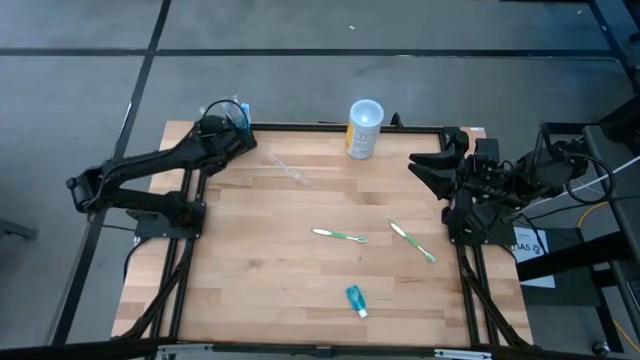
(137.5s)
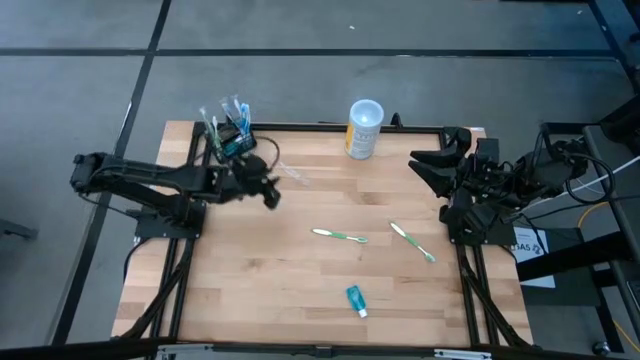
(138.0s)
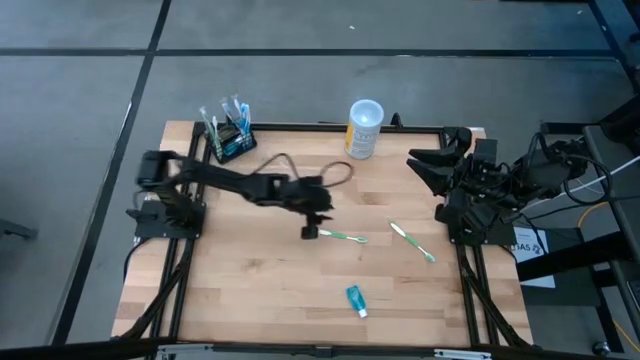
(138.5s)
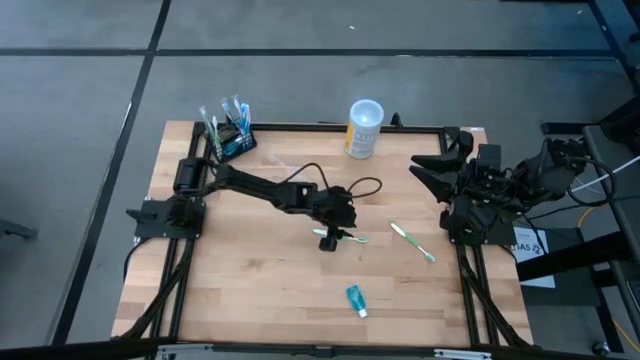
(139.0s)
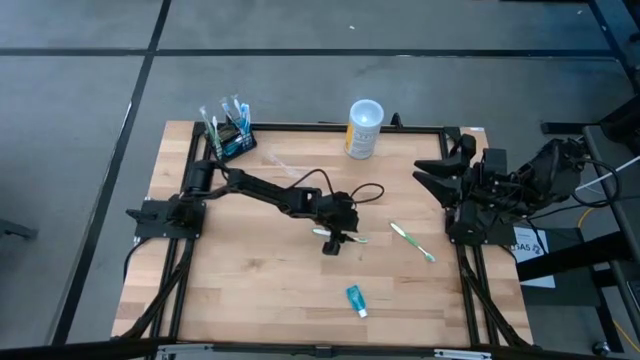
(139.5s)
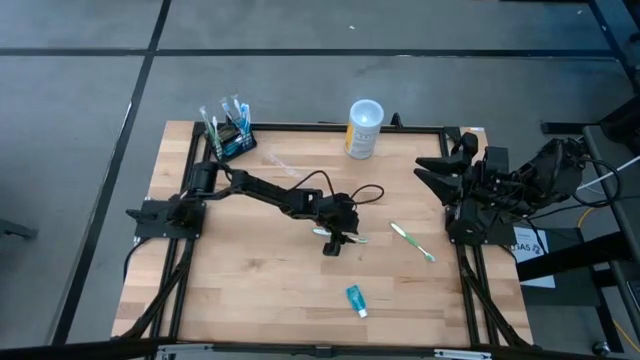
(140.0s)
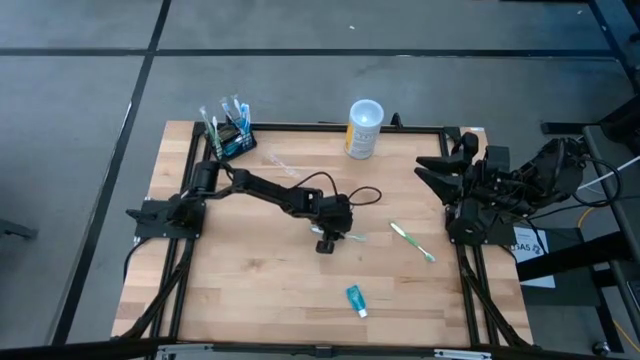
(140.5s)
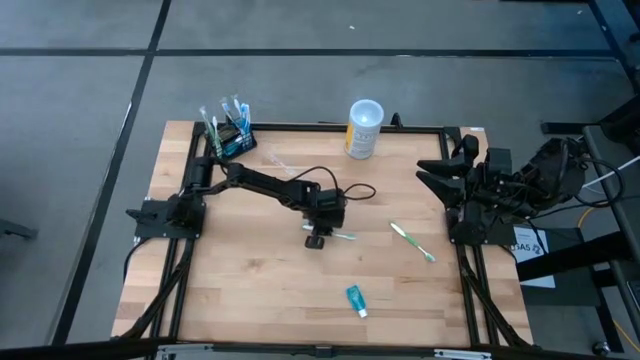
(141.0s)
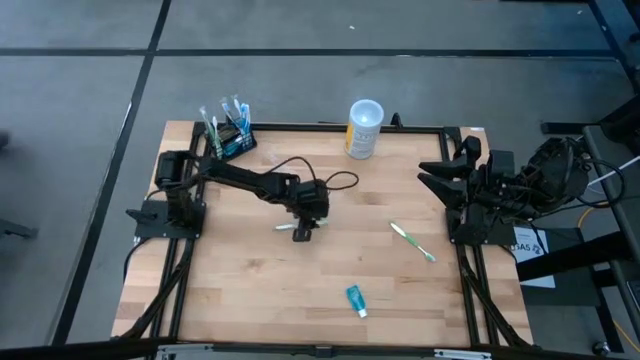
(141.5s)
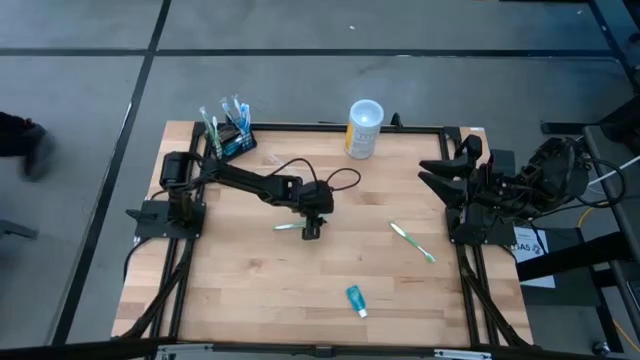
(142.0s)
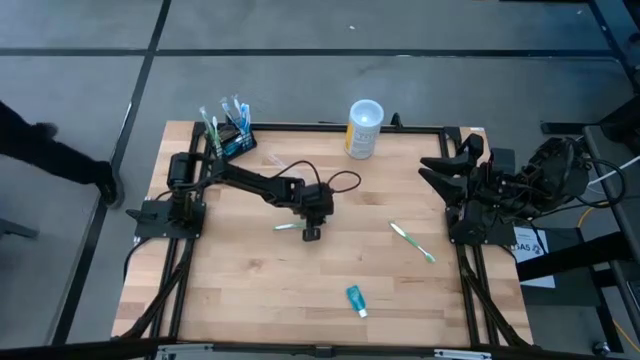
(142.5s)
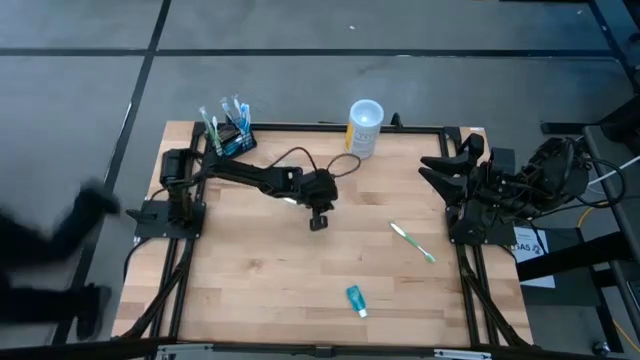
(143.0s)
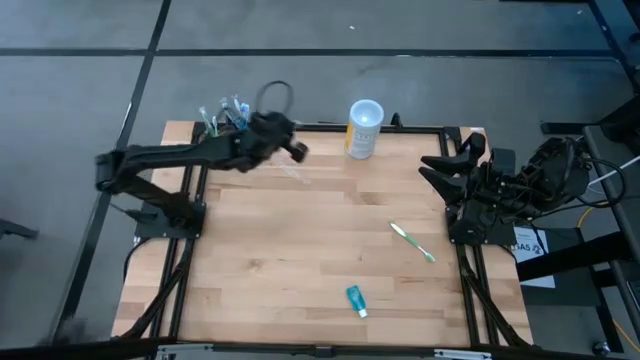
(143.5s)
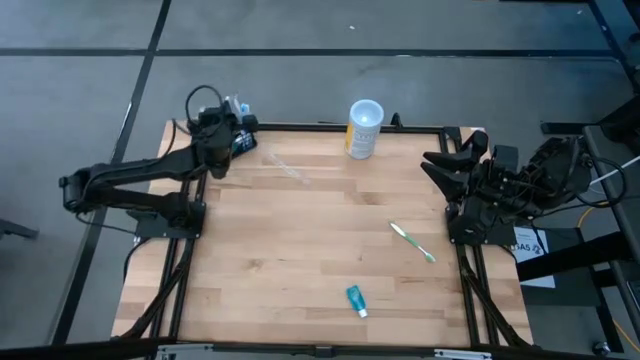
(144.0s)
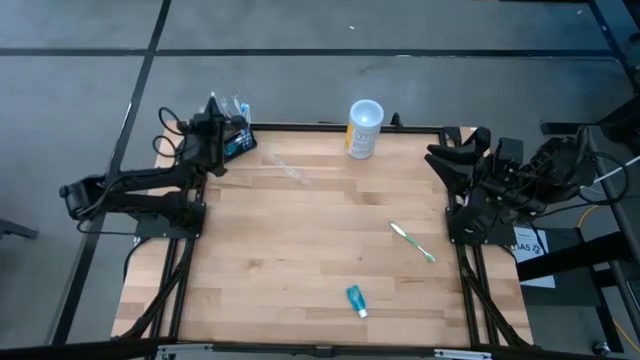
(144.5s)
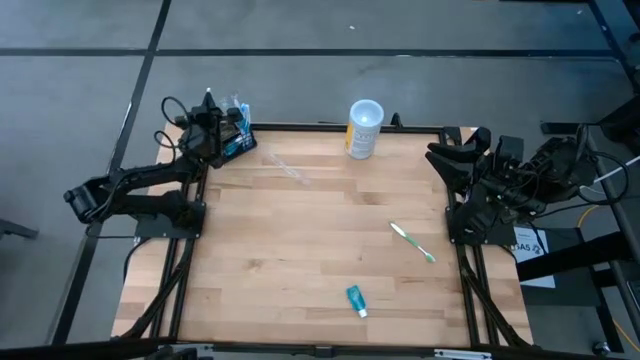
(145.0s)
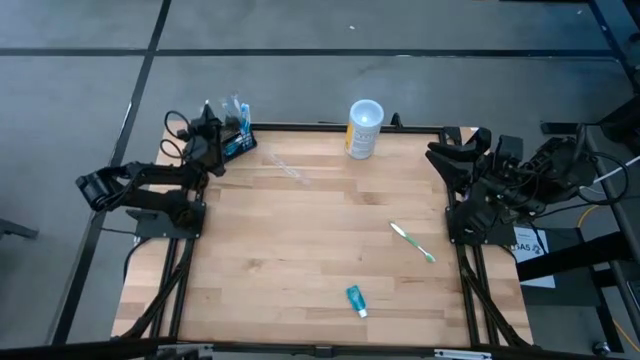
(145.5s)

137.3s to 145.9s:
Task: Pick & Place toothbrushing station
Put the green toothbrush into the left section of the black organizer

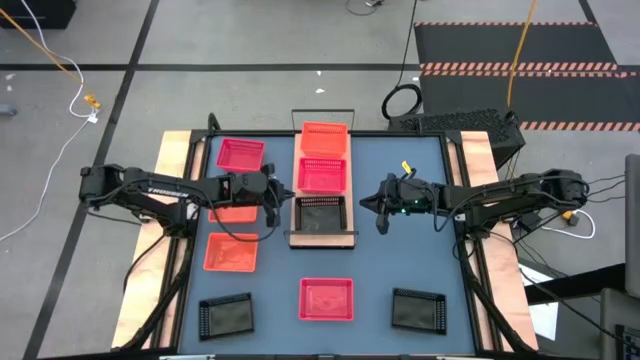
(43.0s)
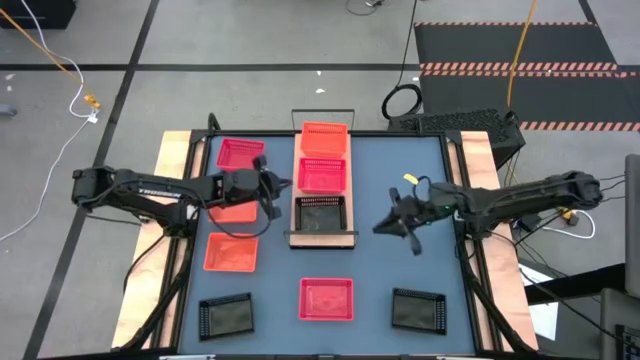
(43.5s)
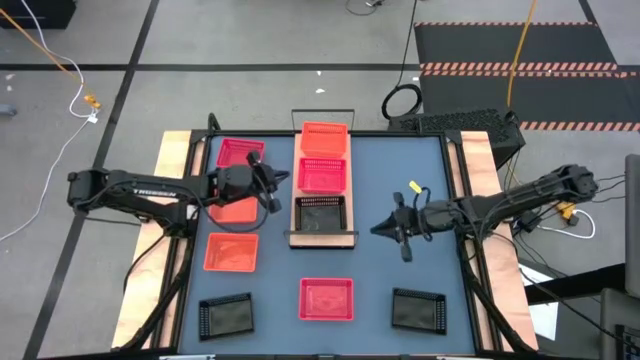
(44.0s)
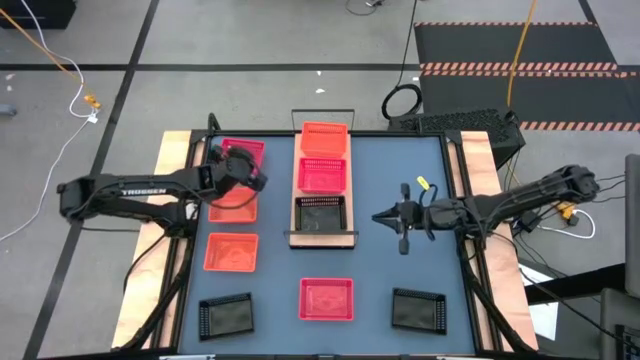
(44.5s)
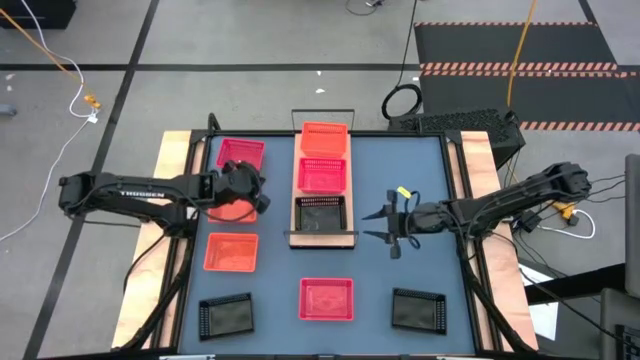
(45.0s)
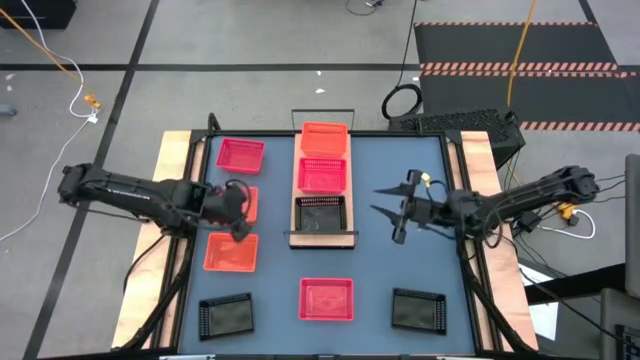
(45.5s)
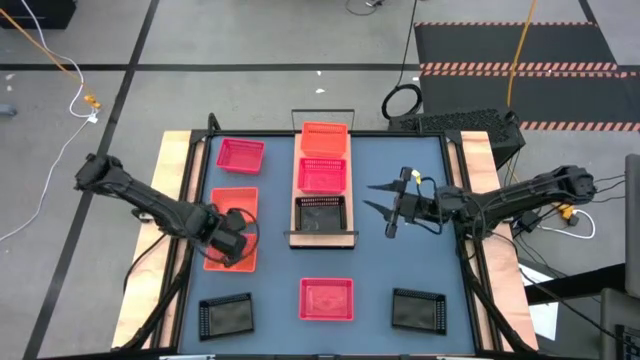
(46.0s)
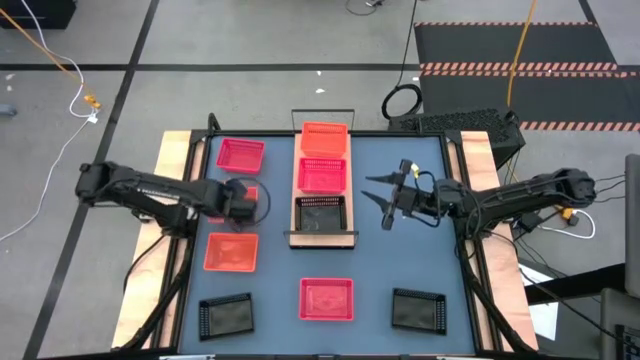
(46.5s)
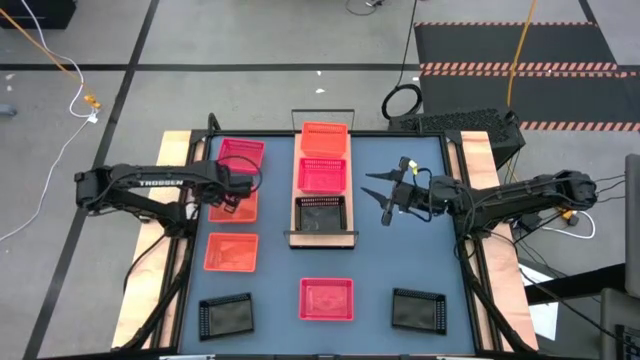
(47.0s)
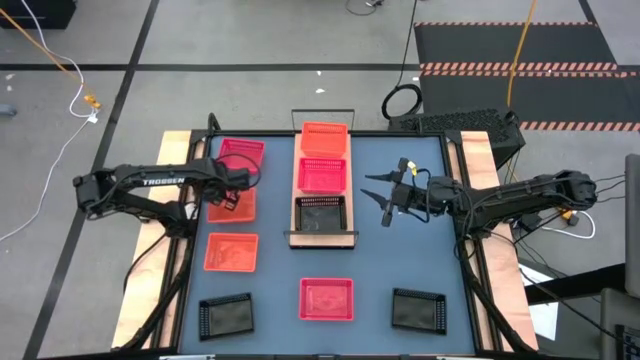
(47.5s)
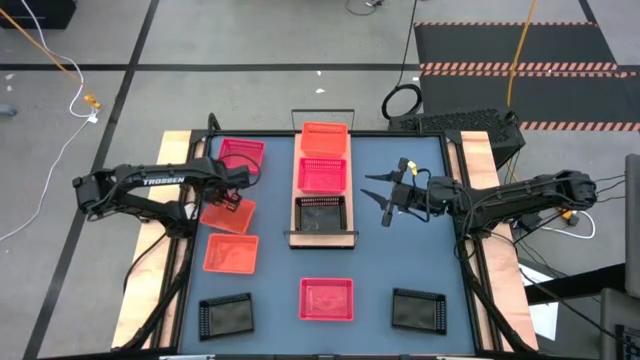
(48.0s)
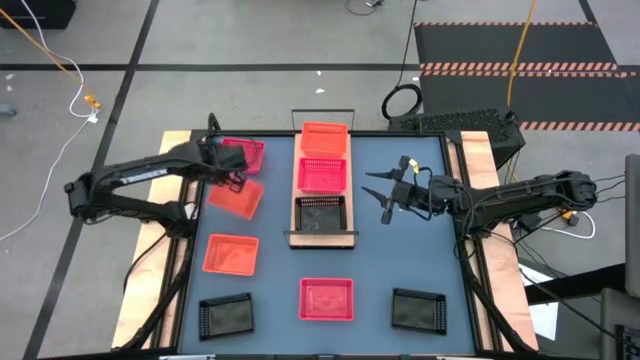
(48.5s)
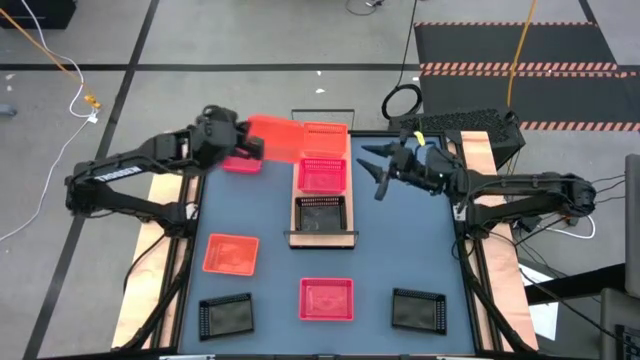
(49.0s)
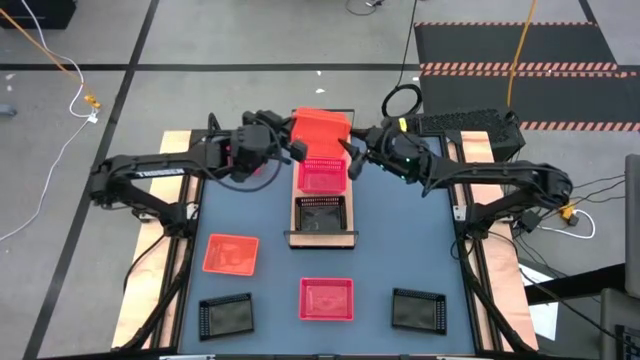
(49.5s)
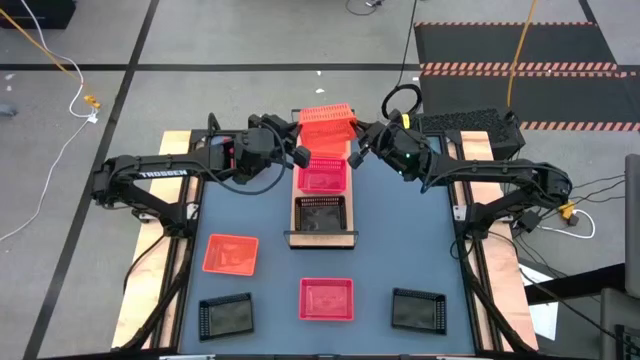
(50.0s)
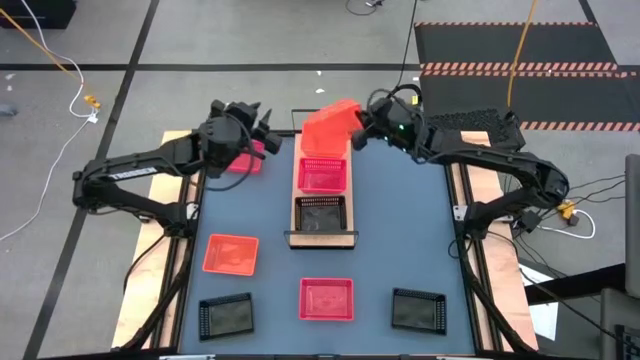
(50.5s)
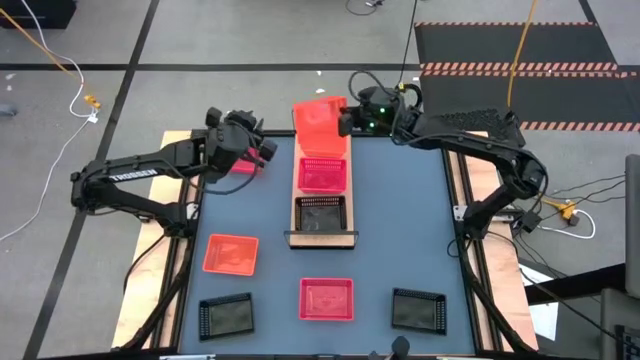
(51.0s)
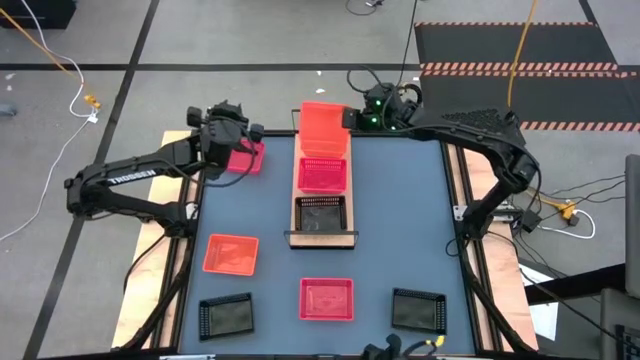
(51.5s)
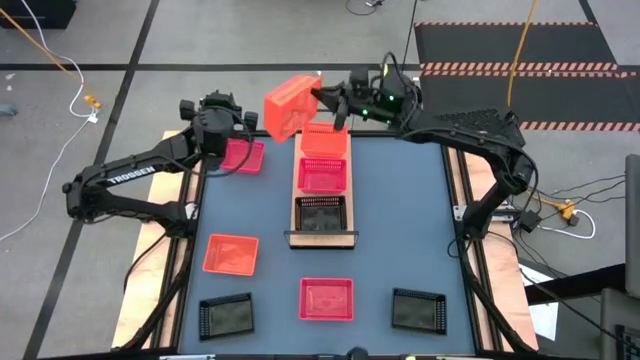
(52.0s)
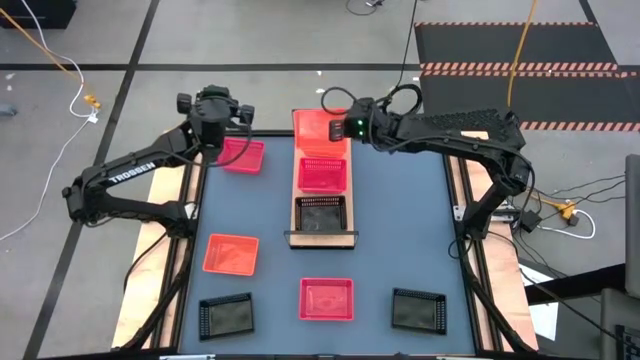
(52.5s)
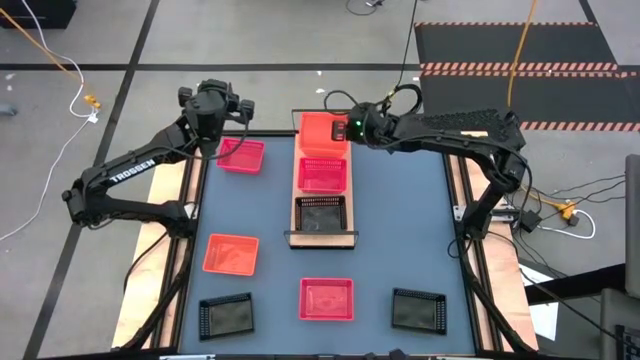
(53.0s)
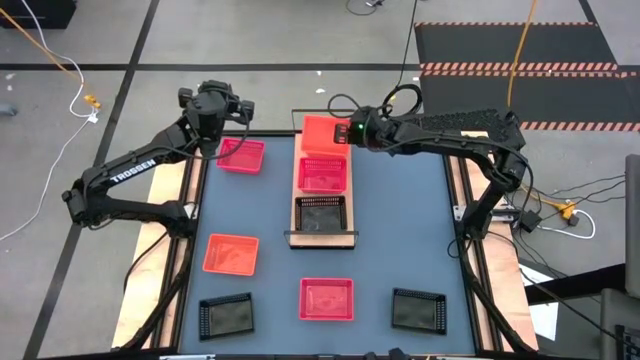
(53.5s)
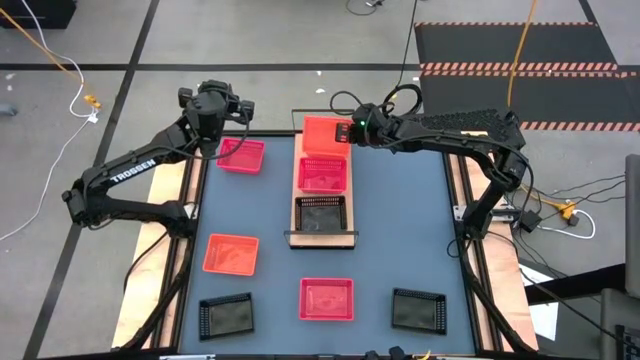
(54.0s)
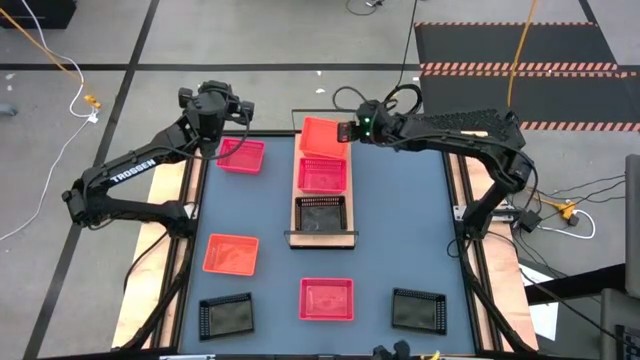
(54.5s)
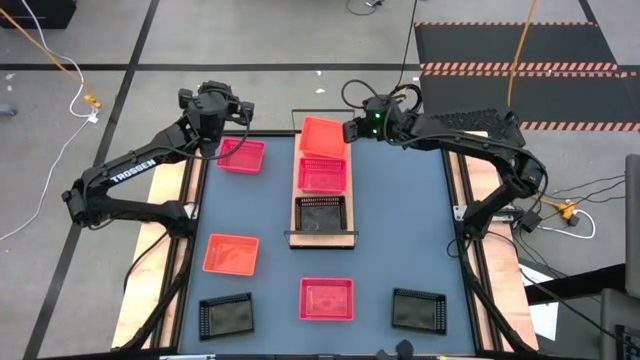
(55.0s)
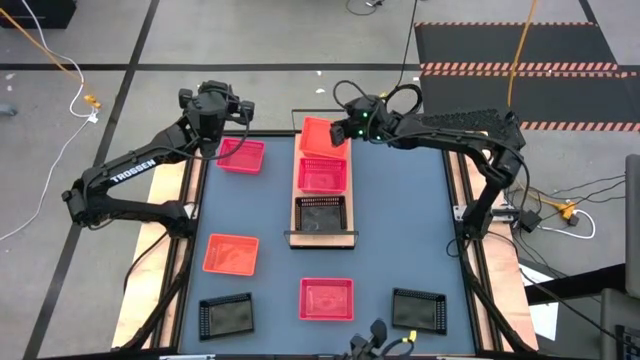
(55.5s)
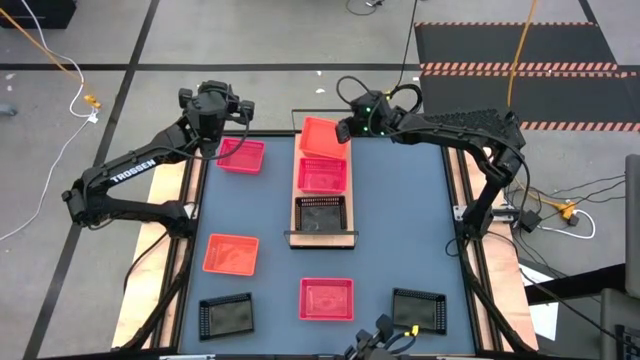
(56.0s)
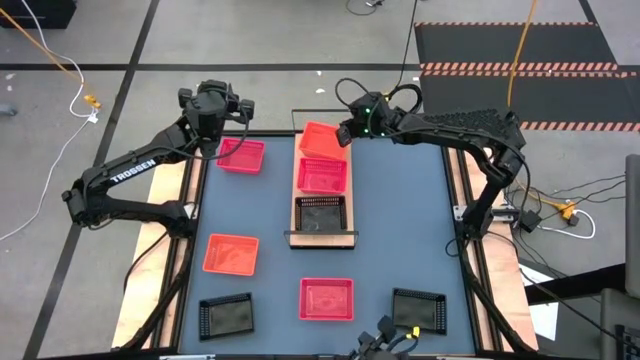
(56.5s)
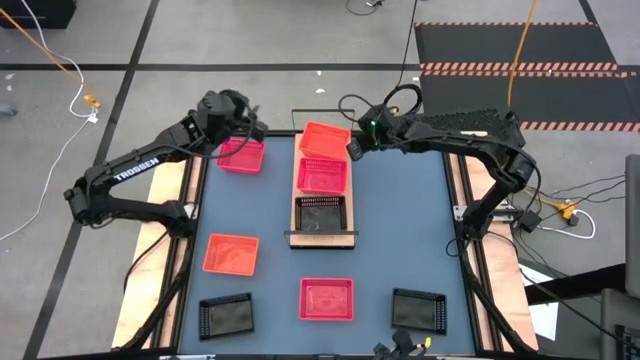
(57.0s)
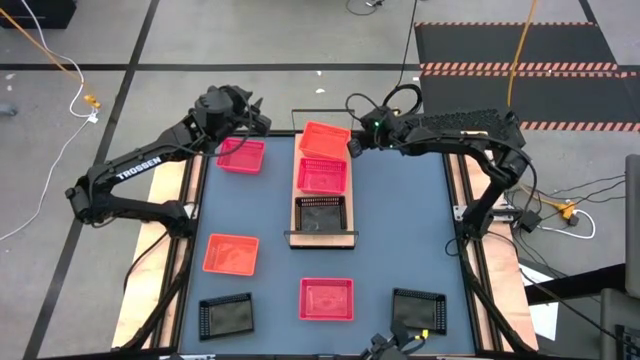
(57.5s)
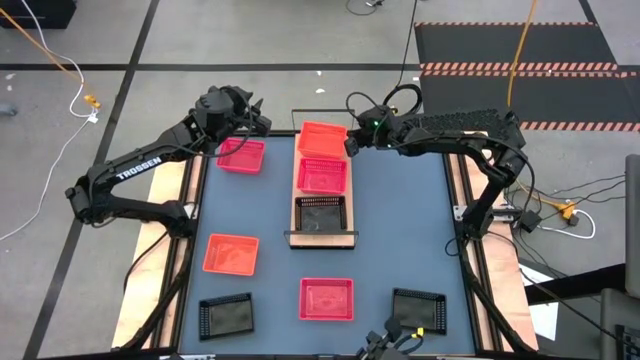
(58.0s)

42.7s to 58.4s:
Task: Stack baskets on shelf by color
Stack the top orange bin on the orange bin on the shelf
